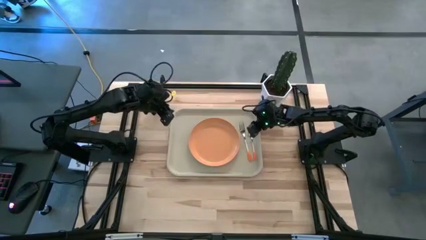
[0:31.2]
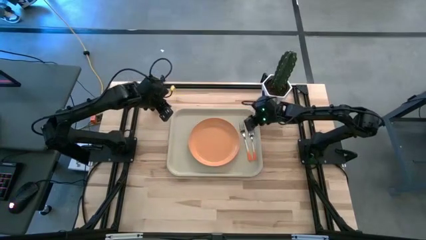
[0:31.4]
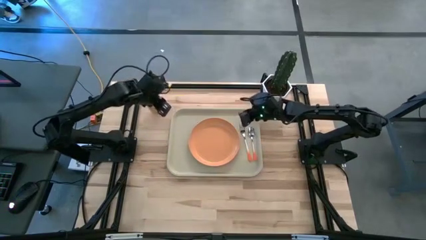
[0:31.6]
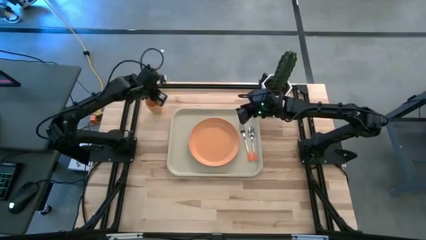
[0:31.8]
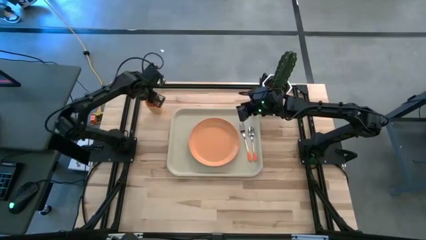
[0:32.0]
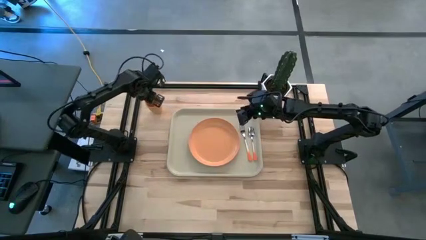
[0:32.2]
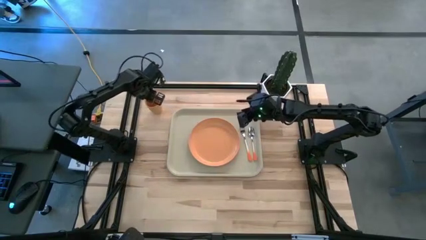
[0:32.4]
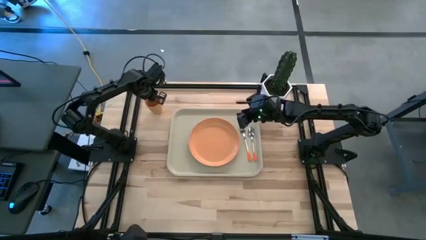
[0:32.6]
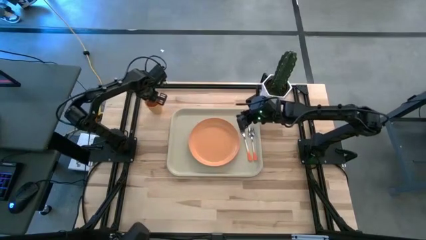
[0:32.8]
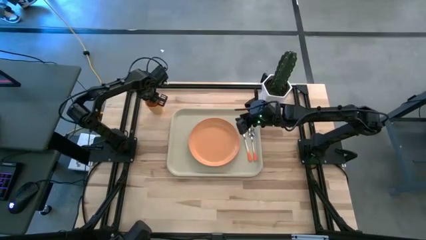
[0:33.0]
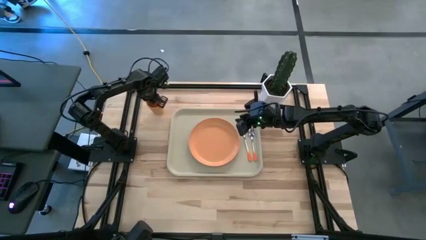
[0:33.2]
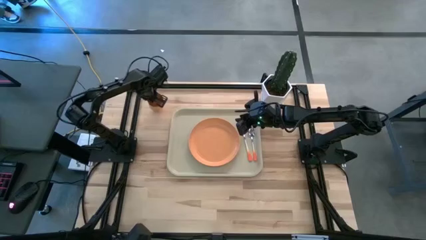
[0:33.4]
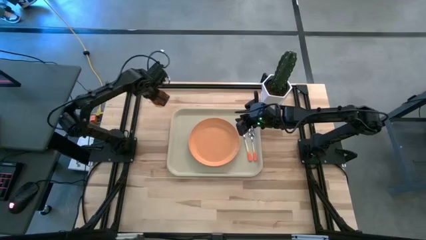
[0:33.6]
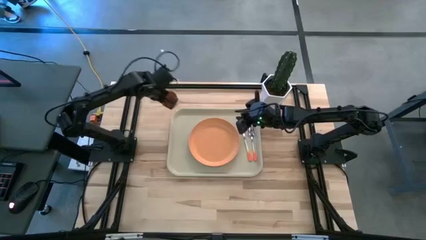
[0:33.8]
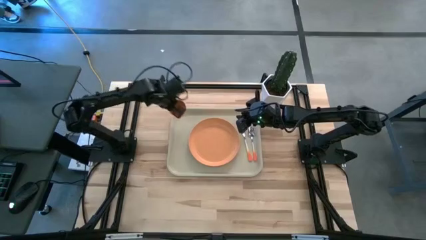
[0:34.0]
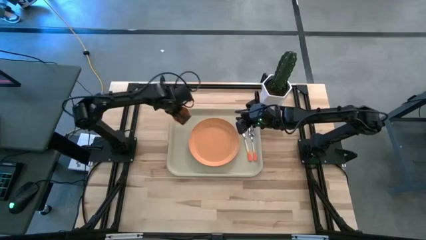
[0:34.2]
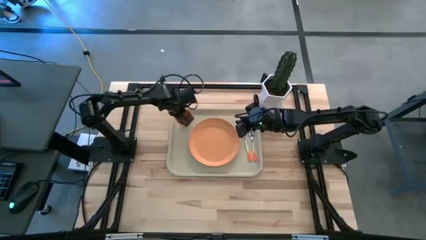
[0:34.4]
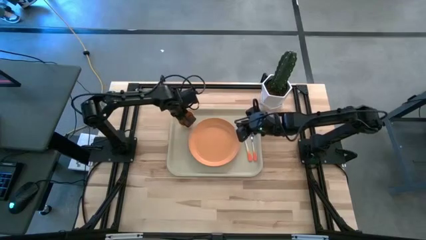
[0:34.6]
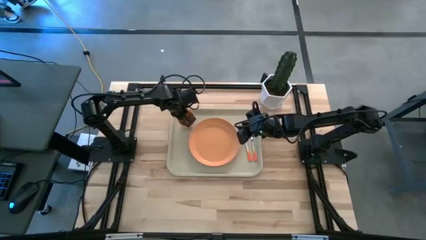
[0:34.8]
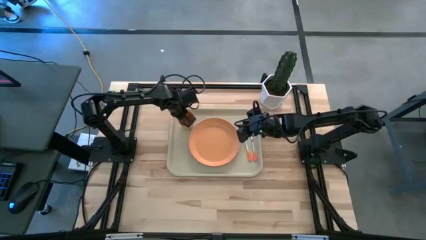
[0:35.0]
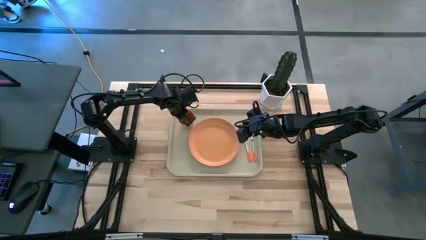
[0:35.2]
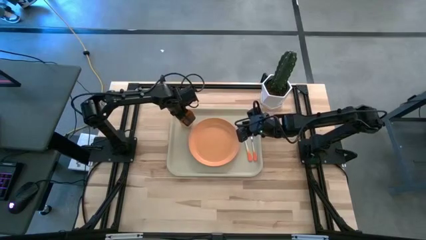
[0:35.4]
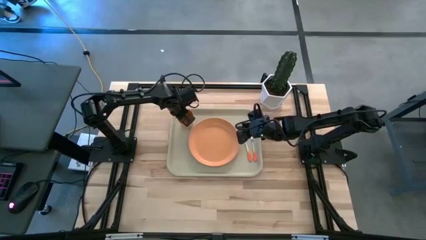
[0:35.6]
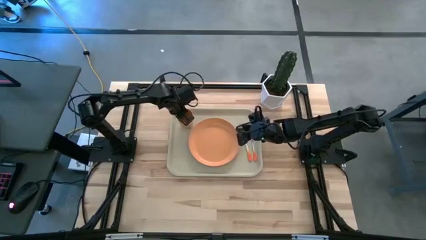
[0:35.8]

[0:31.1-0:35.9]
Task: Pick and place plate/cup/fork/spoon on tray
Put the light orange cup on the white tray to the top left of the light orange plate

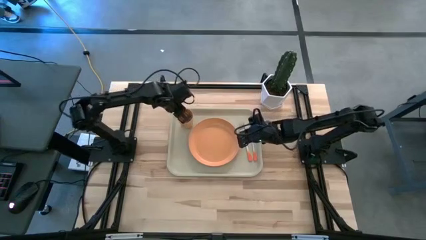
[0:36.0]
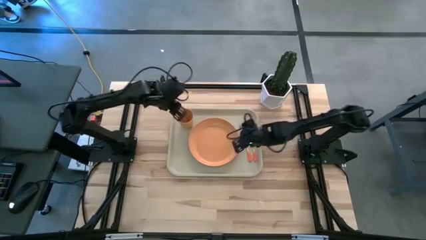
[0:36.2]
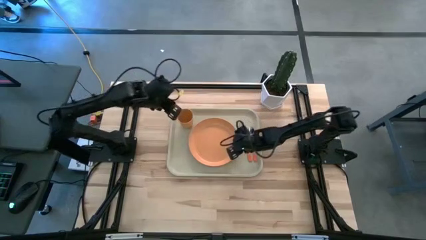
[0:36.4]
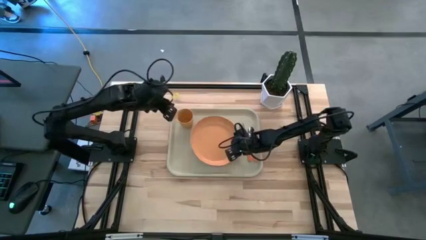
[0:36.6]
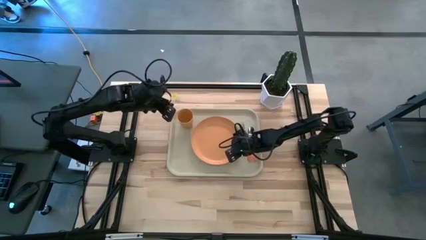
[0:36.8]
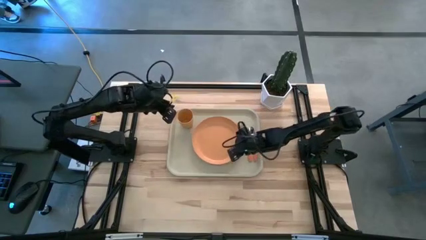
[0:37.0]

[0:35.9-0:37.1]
Adjust the light orange plate on the white tray

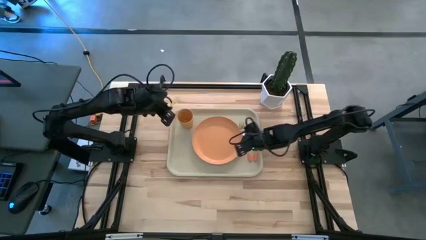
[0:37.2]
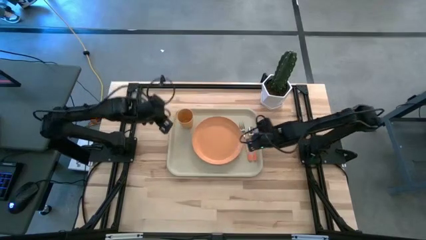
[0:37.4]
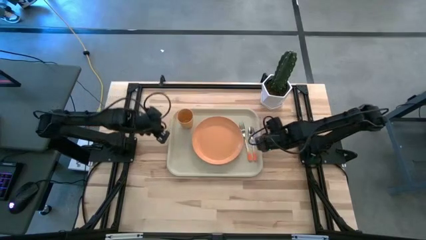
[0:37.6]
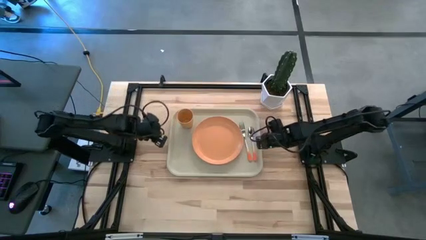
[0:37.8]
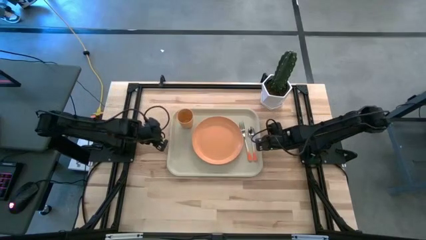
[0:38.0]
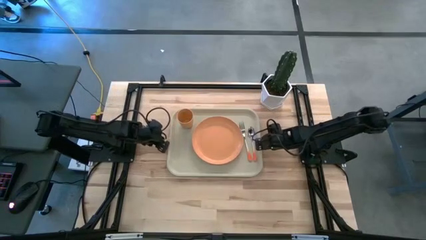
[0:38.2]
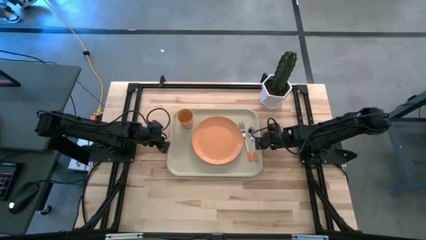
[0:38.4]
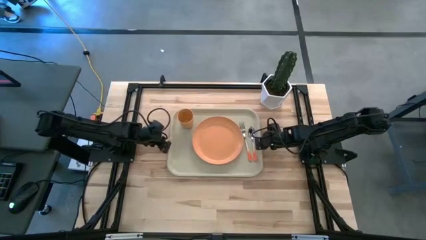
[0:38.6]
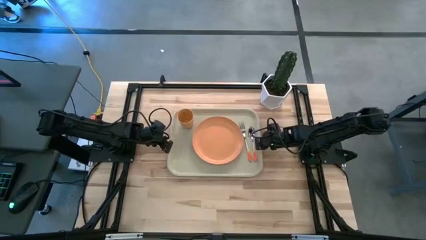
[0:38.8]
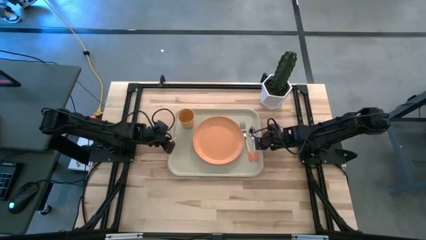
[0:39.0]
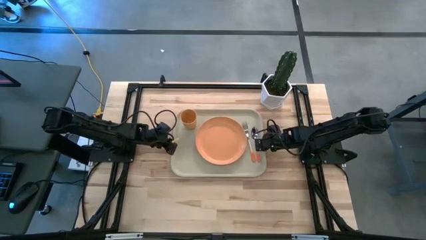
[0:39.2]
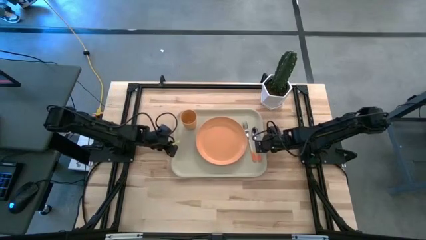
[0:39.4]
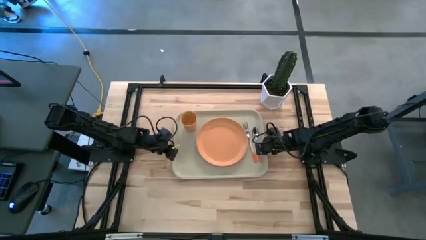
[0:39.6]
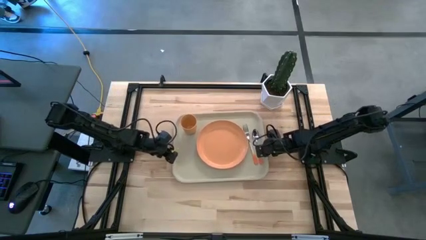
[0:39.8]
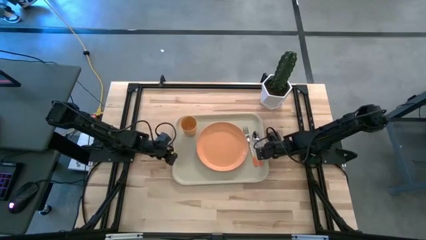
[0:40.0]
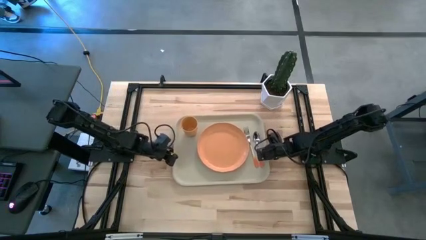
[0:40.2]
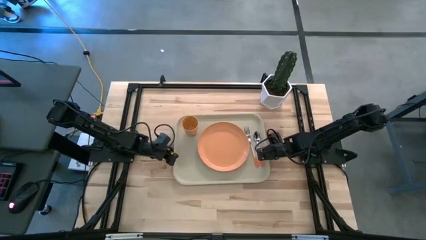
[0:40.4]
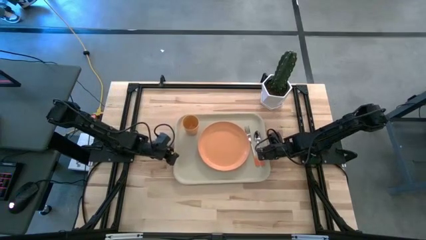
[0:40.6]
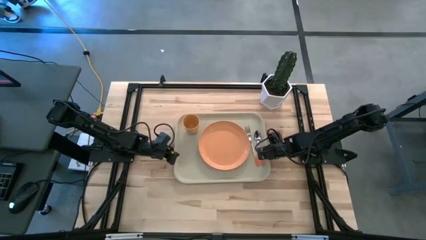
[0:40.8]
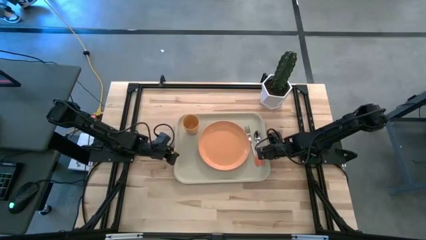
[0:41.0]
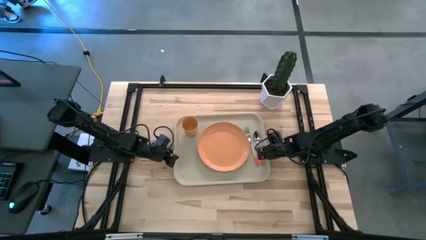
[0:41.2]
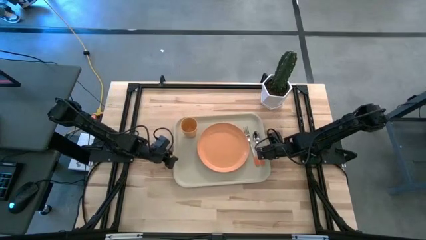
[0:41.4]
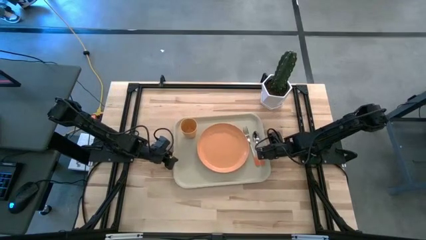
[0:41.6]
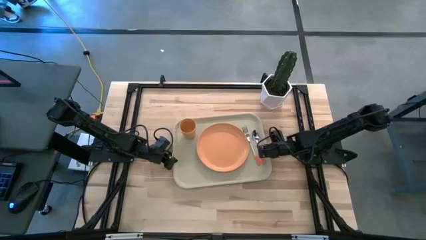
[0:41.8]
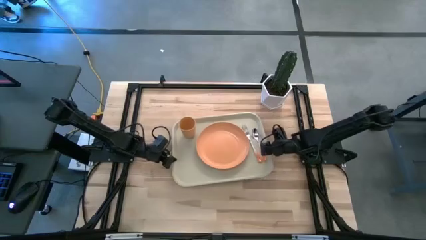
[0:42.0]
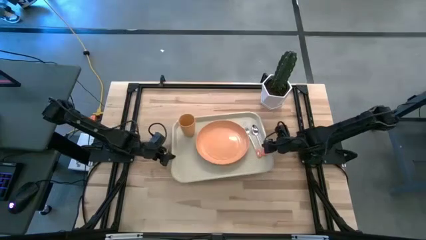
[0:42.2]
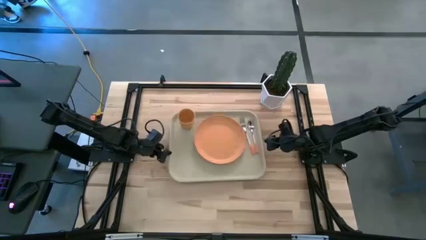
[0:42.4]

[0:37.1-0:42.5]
Move the white tray to the center of the table

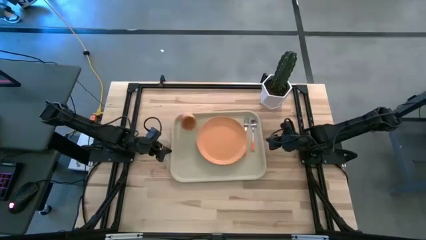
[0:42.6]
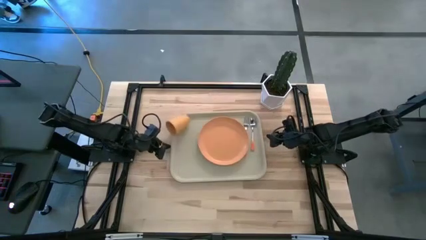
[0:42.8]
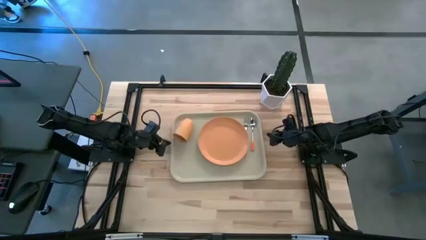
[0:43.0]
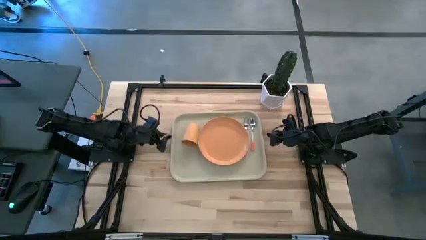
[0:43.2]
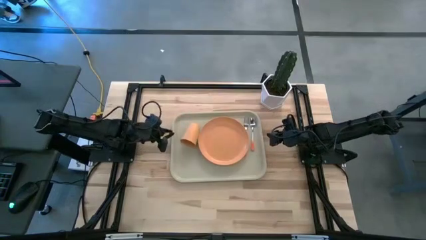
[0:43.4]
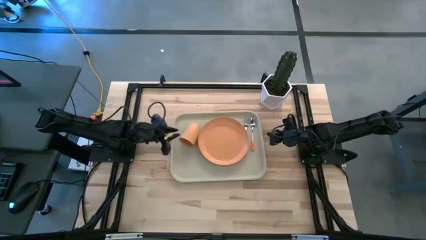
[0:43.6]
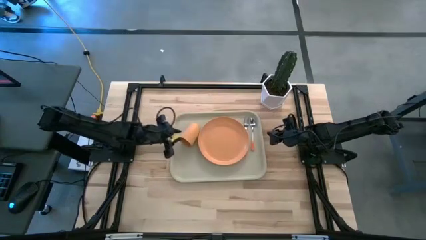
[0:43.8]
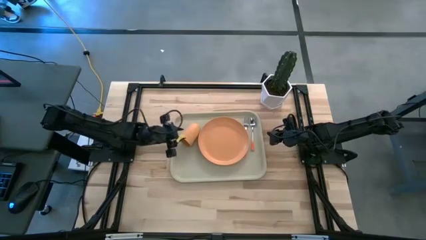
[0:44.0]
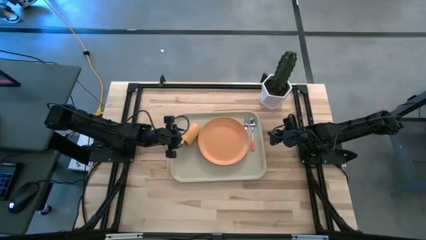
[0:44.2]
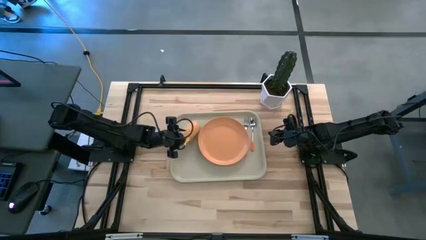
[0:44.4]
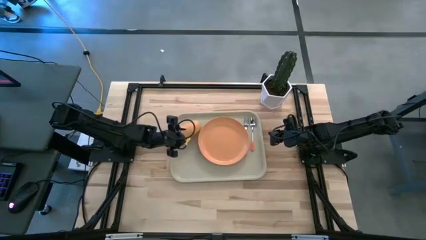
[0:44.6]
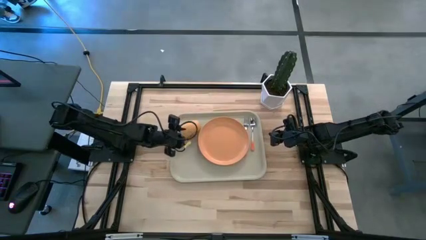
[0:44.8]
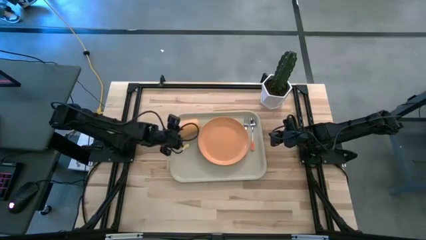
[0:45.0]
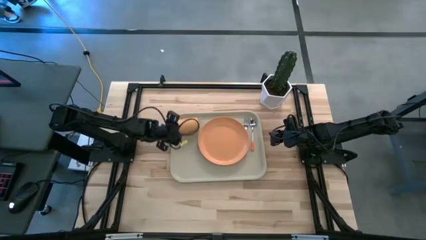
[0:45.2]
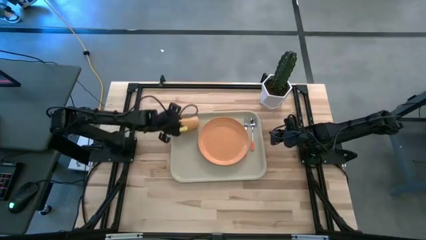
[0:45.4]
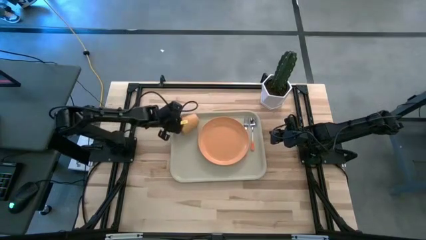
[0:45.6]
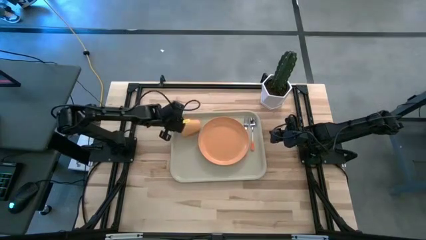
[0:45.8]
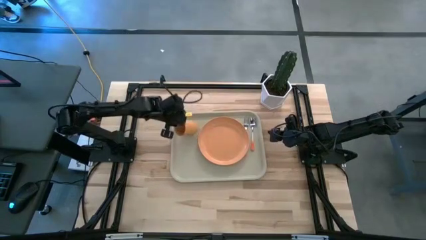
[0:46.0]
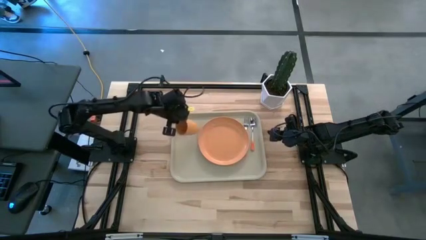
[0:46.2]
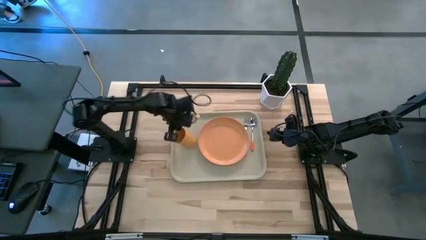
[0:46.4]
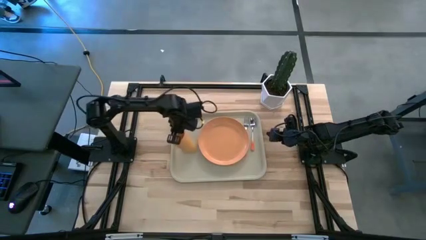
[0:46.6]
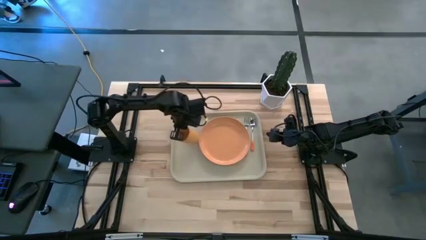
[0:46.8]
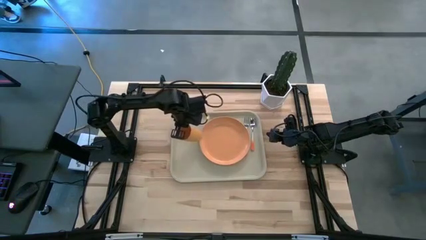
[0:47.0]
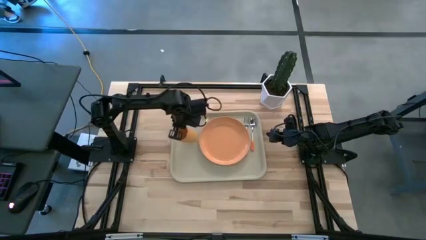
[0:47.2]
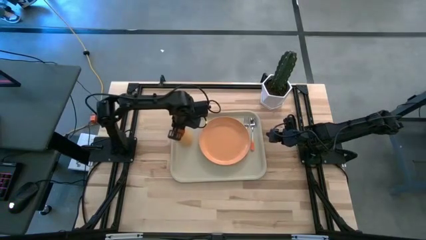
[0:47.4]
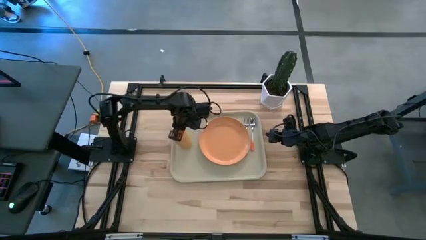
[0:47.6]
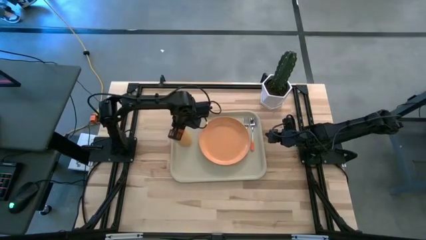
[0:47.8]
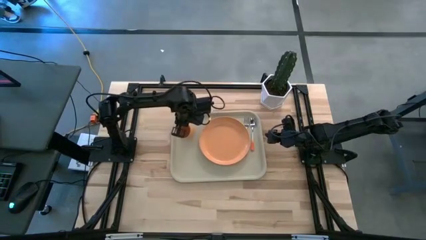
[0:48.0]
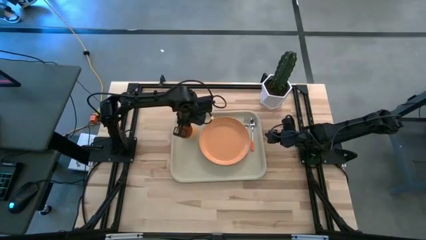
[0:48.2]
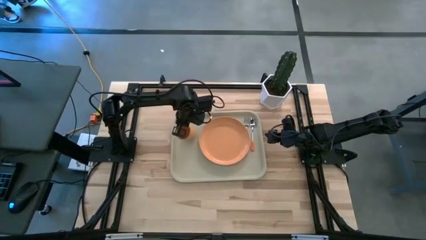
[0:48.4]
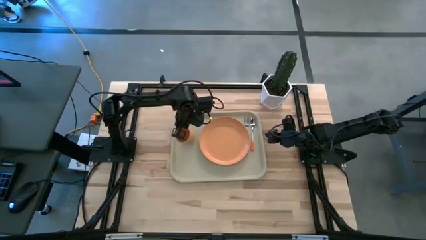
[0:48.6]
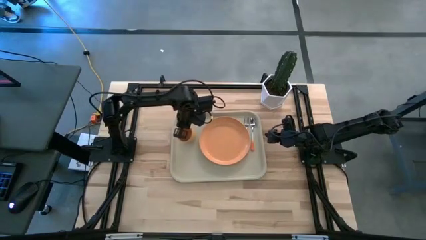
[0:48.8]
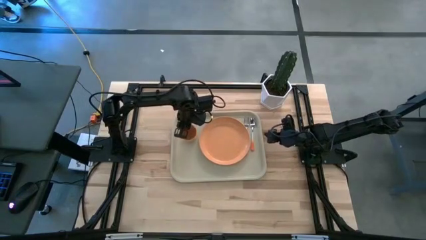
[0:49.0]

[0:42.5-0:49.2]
Adjust the light orange cup on the white tray
